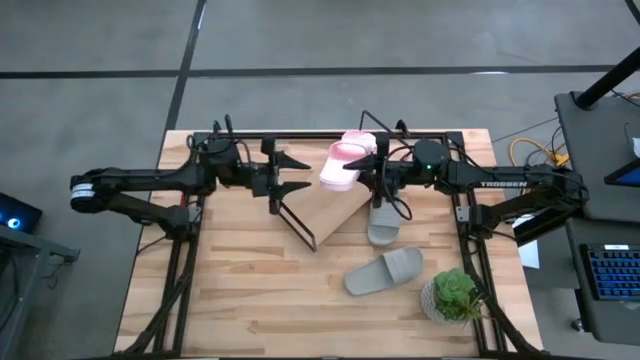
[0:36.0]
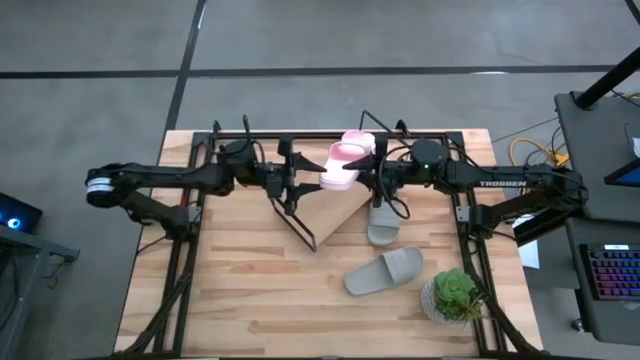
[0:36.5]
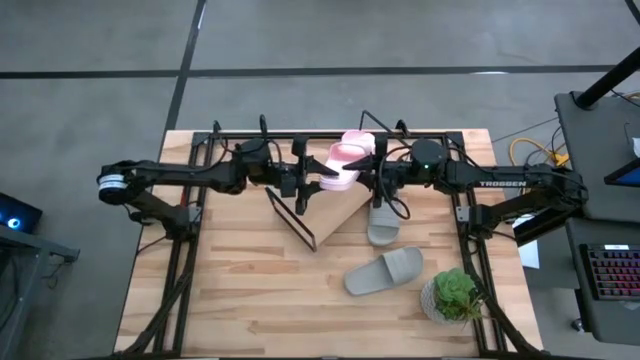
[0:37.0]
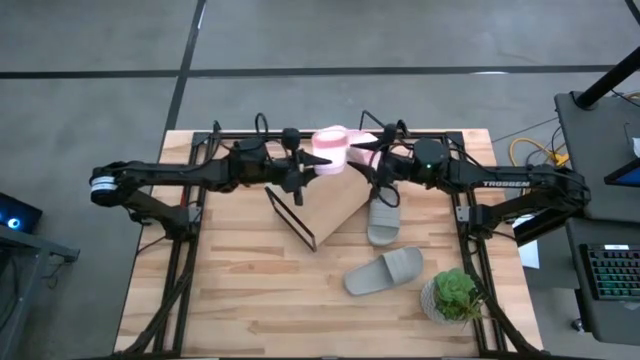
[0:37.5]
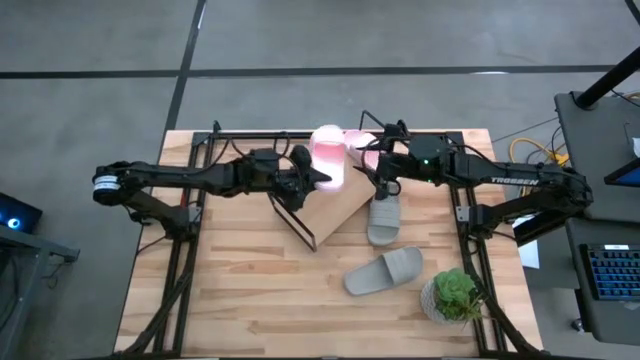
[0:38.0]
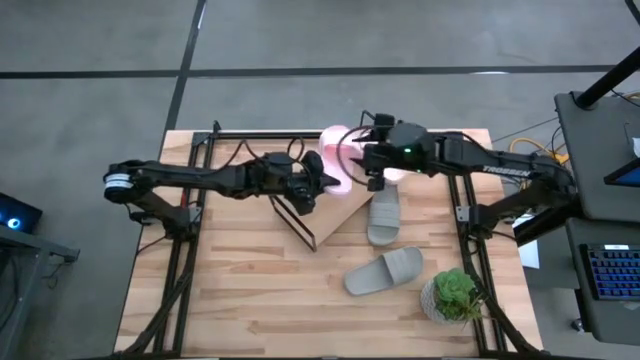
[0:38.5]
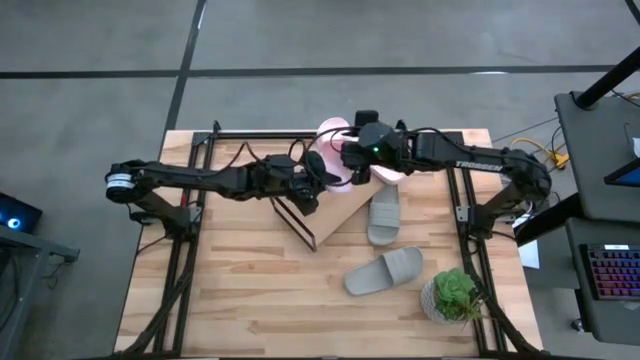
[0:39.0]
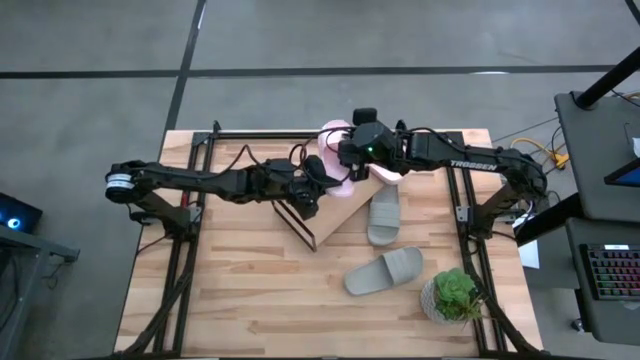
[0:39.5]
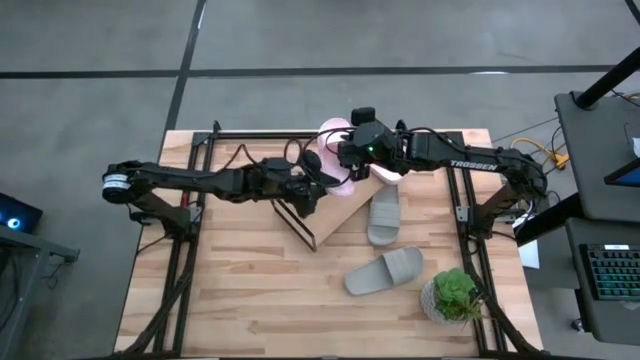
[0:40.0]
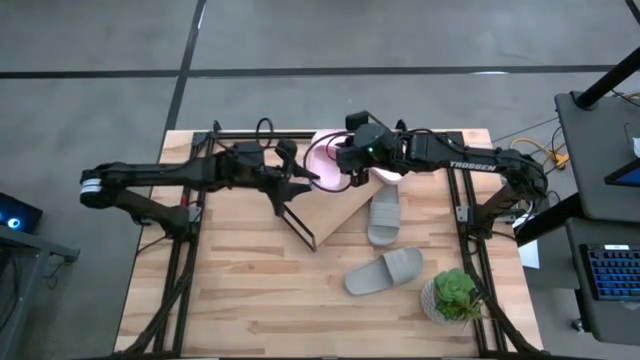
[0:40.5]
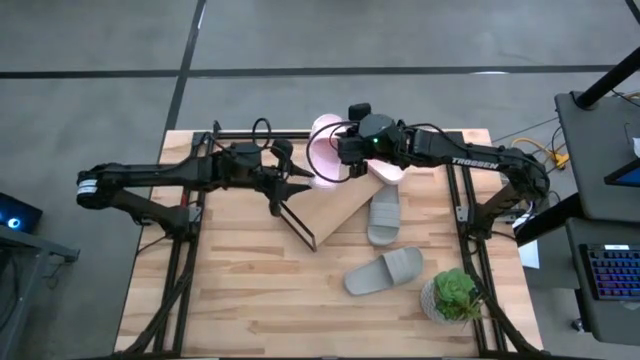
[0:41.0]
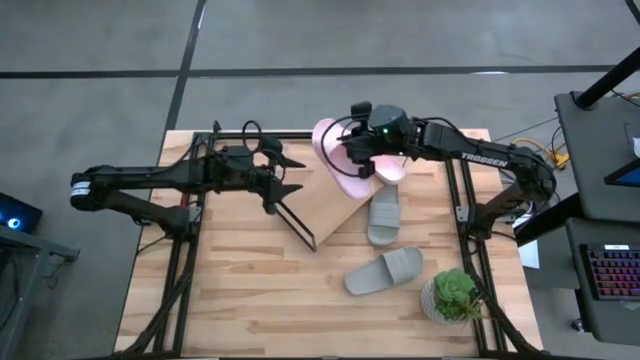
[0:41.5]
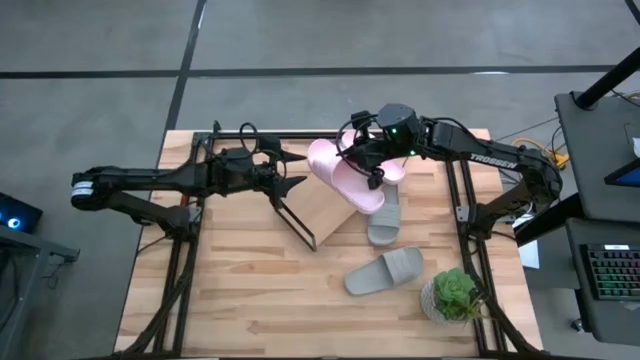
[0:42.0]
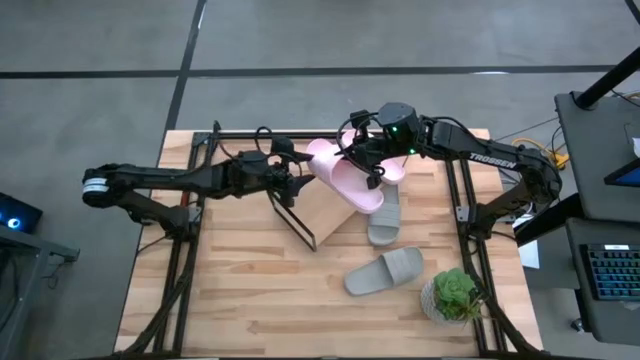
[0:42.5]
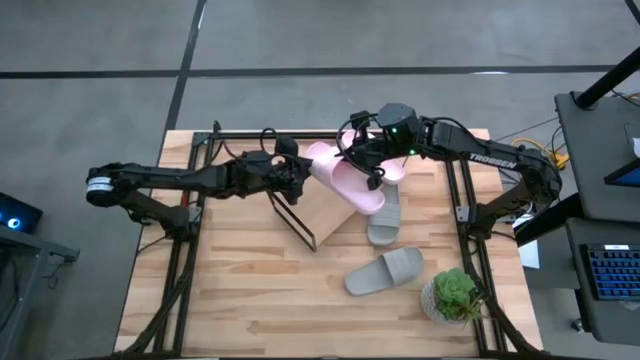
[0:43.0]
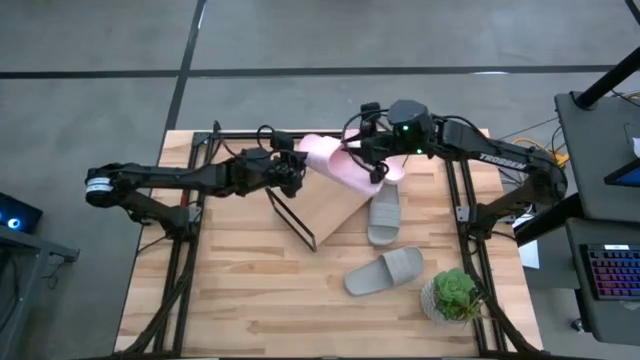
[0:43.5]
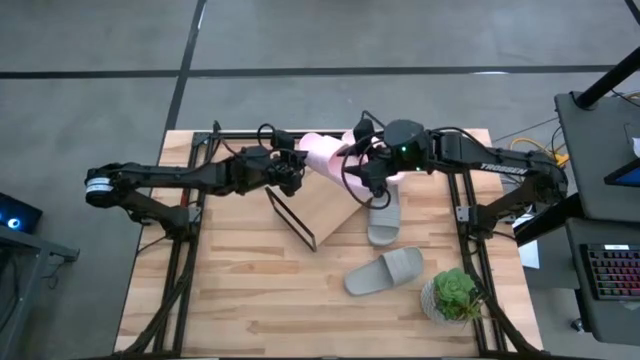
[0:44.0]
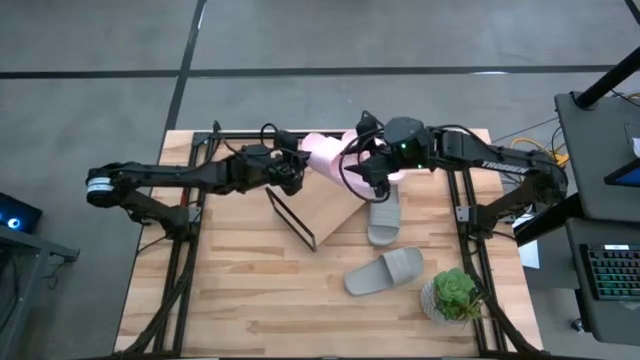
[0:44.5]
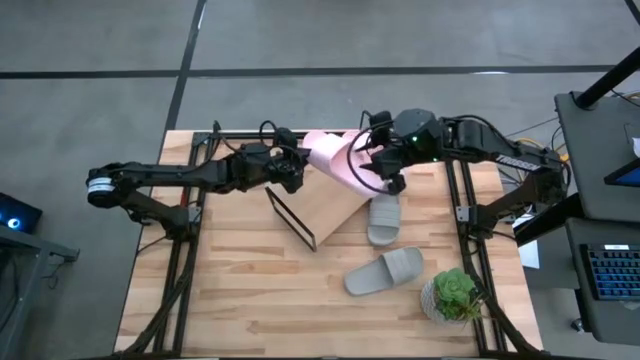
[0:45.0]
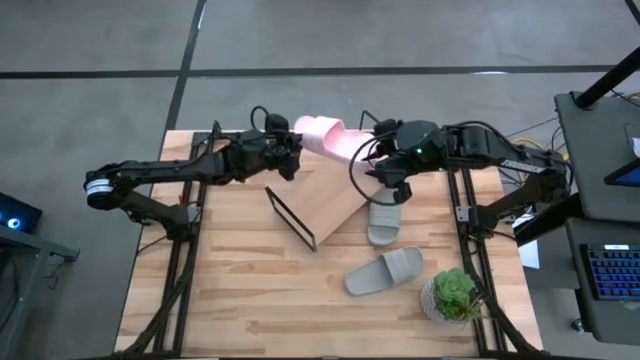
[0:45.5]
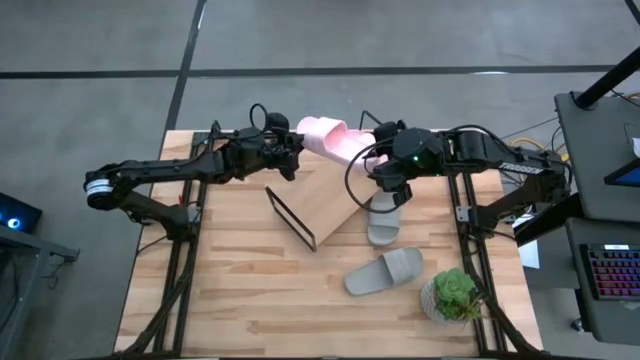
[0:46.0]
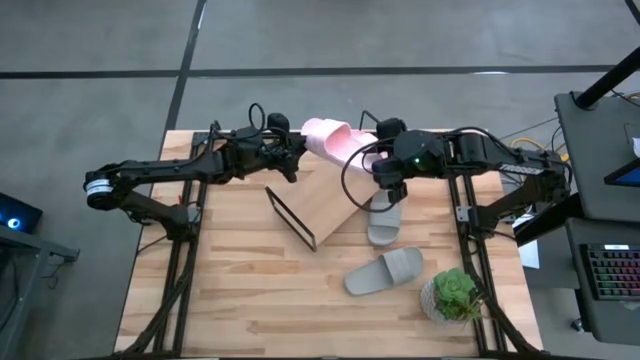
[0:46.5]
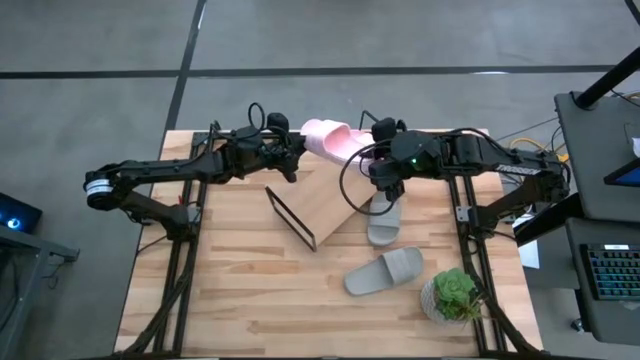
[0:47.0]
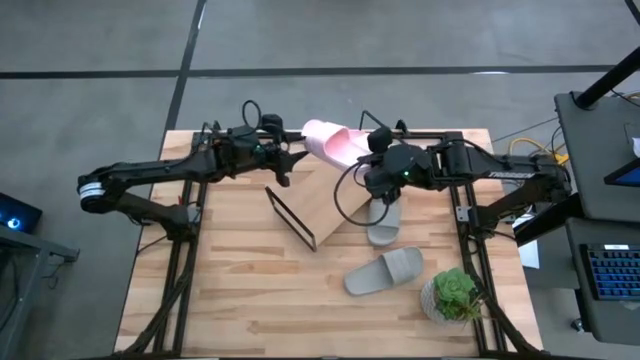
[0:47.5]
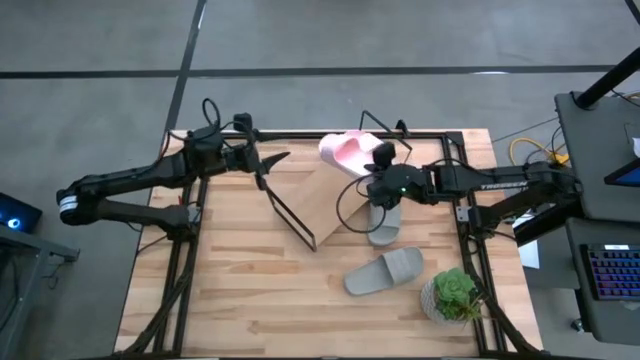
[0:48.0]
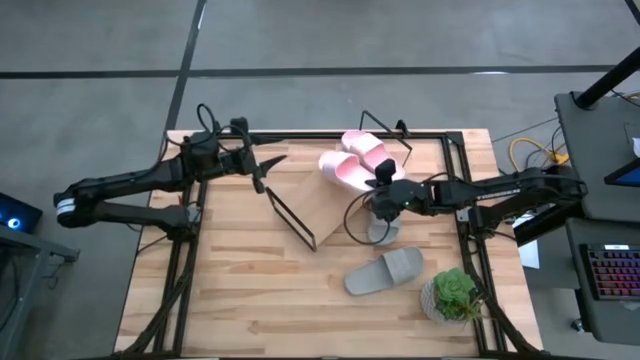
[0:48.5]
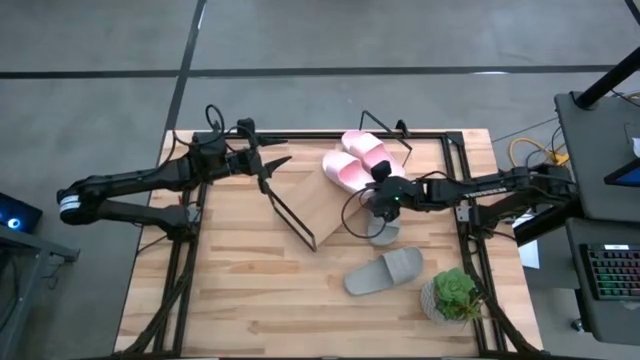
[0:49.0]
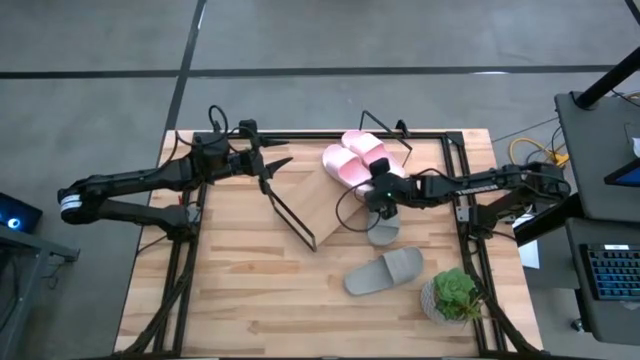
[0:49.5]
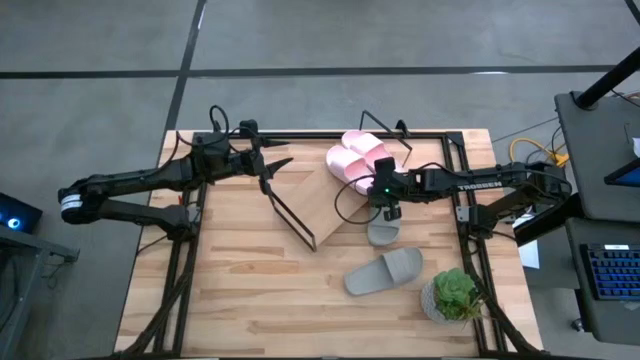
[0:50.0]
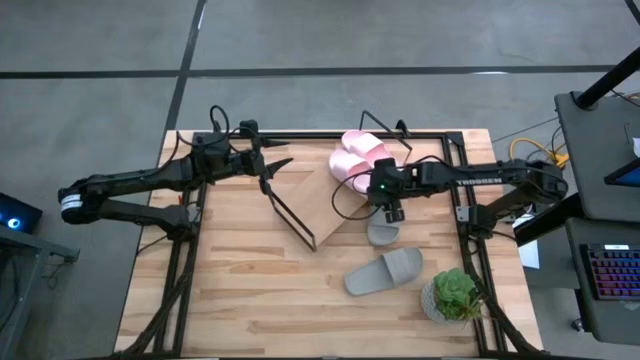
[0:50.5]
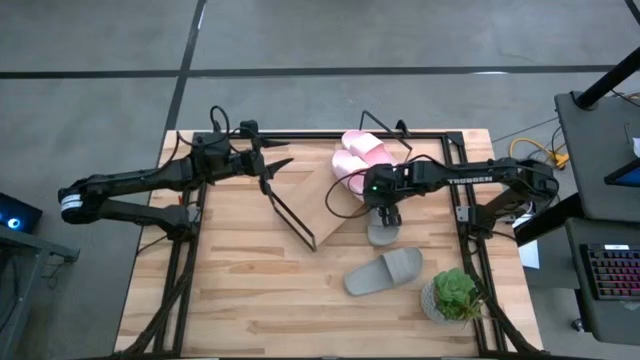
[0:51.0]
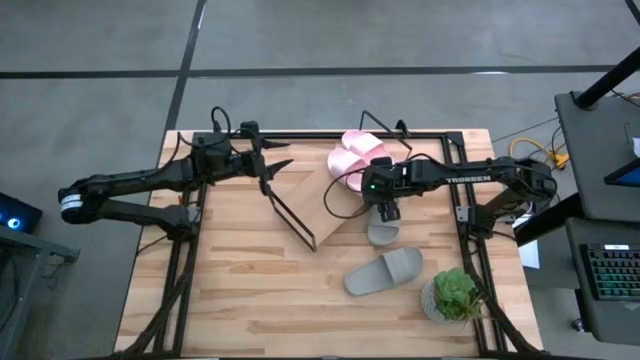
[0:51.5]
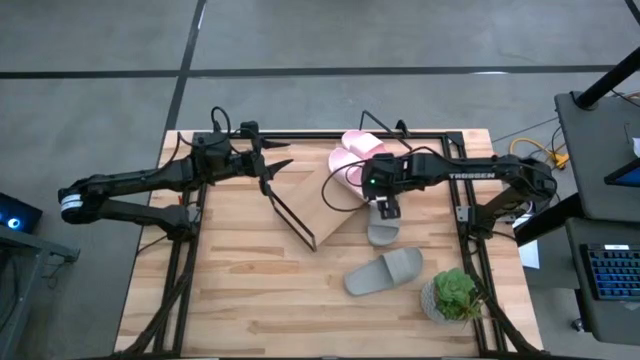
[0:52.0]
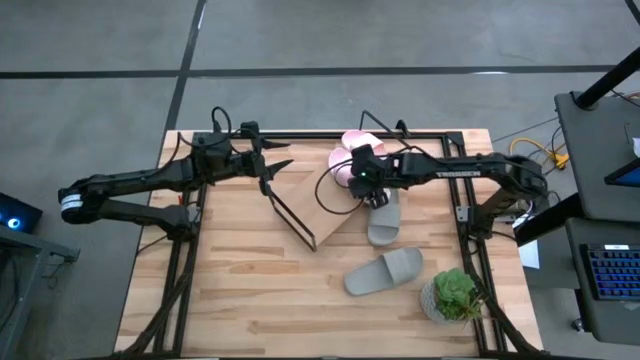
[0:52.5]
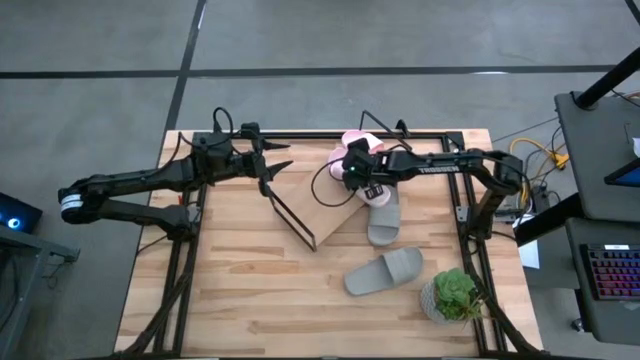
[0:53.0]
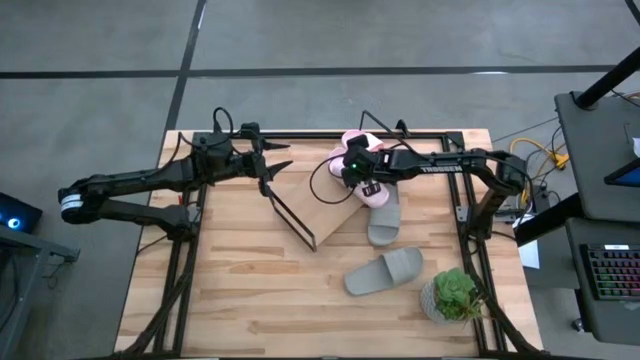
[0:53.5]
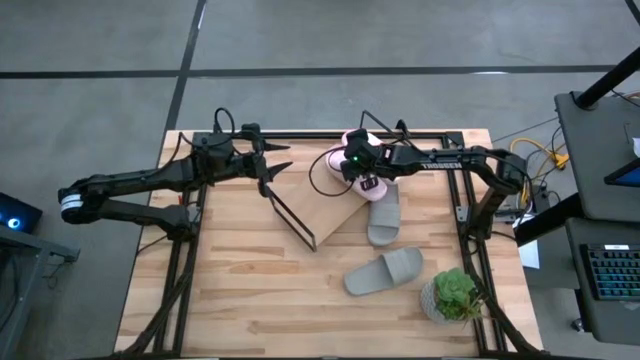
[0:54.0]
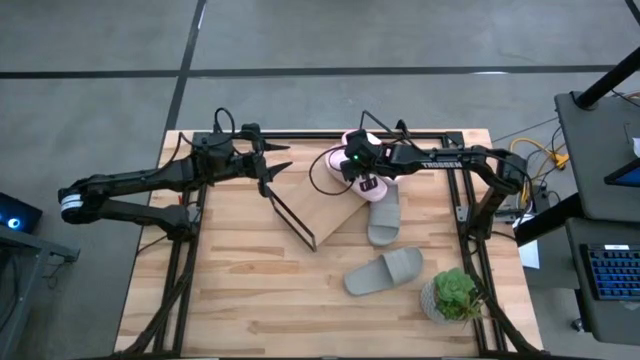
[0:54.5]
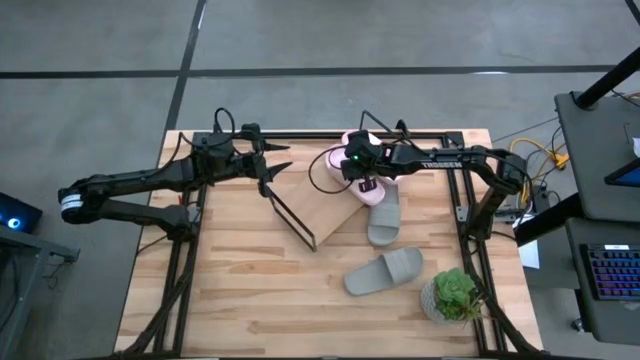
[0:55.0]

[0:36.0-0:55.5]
Task: Pick and place slides into the shelf
Put the pink slide on the shelf

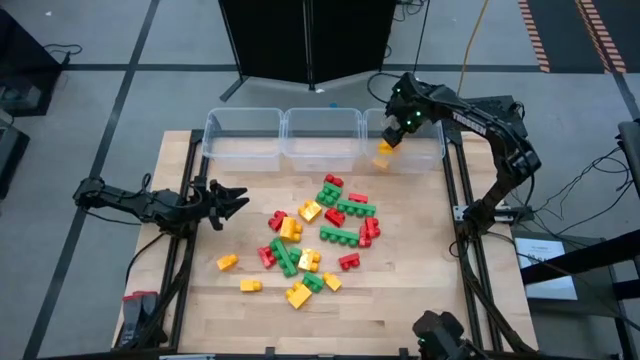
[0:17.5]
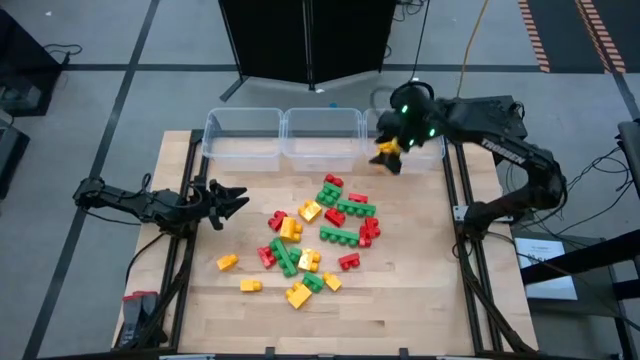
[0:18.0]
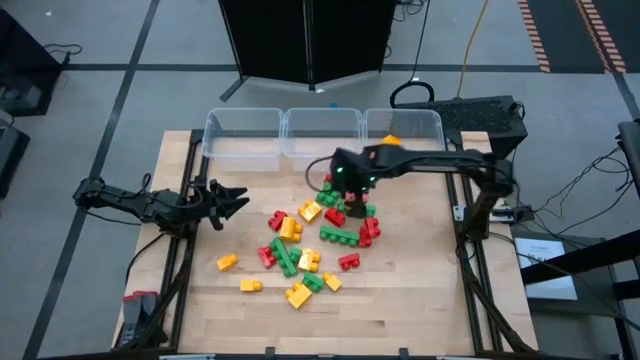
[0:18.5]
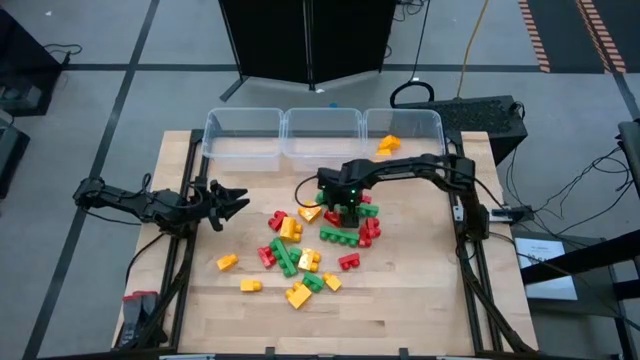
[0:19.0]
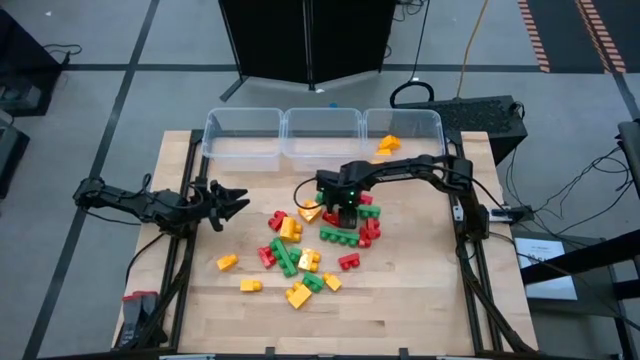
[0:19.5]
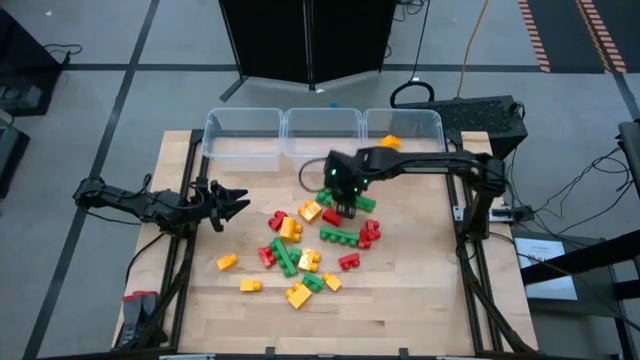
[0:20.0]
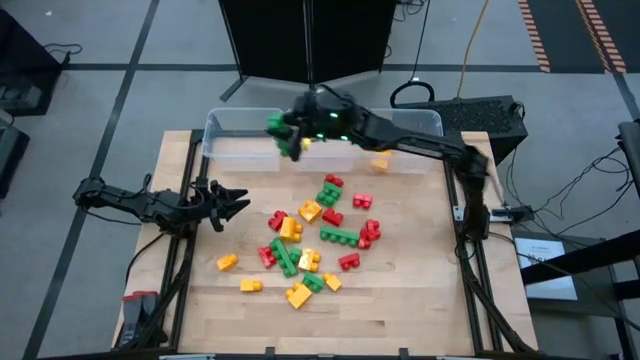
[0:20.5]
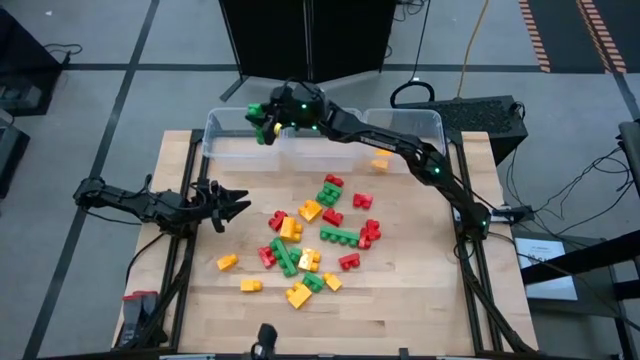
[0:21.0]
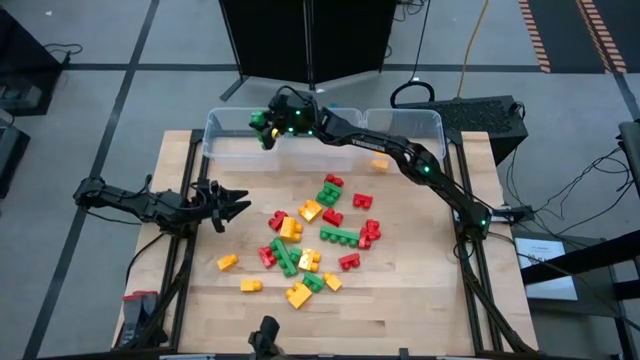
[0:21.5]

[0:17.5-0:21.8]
Task: Sort blocks
Put the green game piece with 4 studs into the left transparent bin
